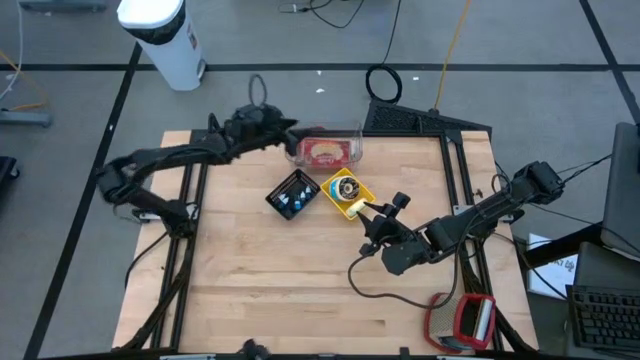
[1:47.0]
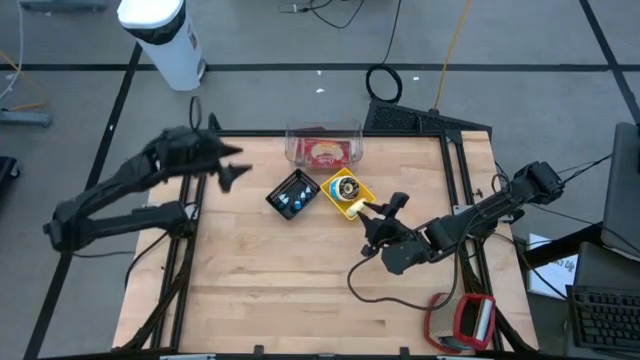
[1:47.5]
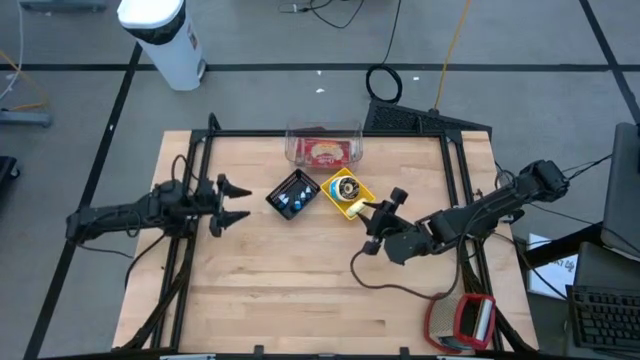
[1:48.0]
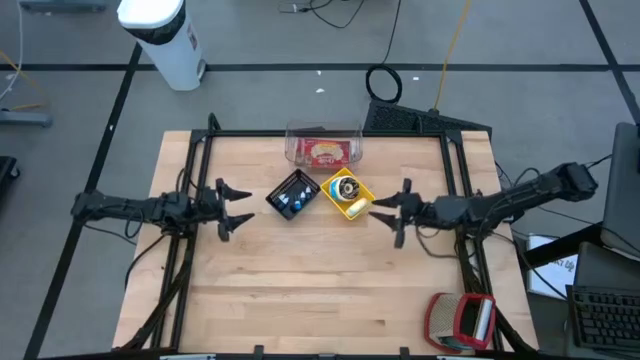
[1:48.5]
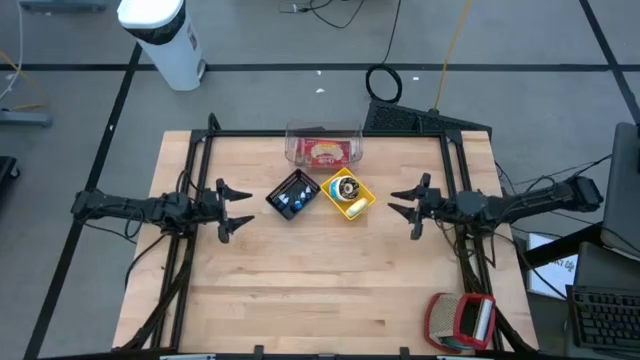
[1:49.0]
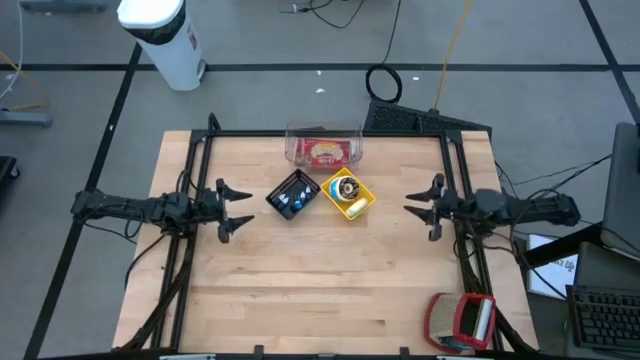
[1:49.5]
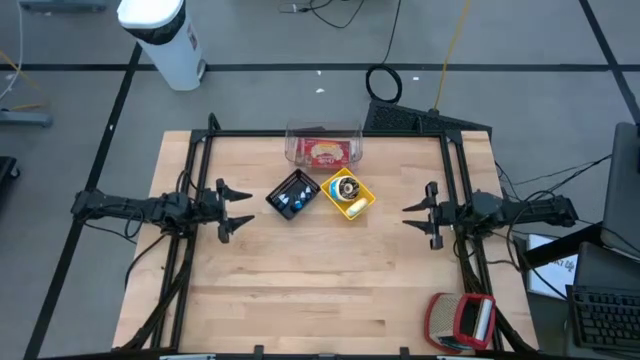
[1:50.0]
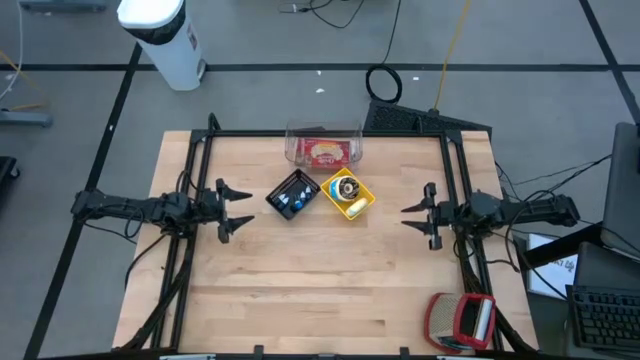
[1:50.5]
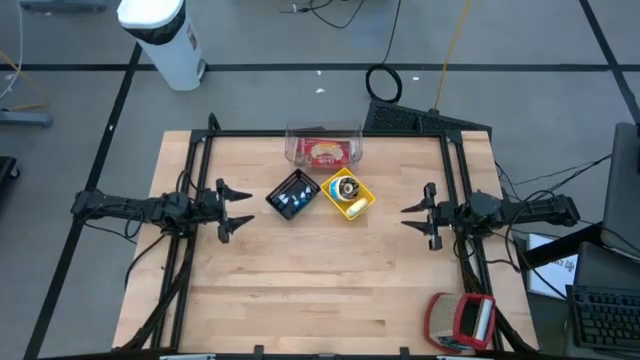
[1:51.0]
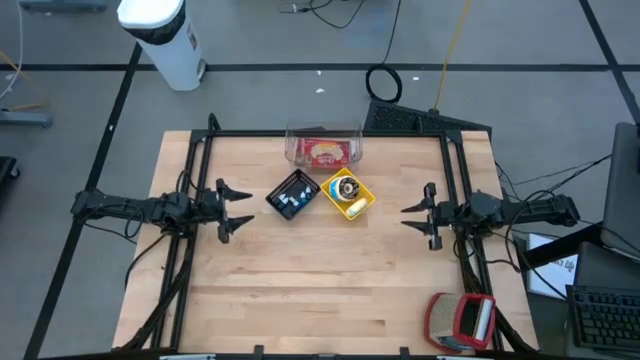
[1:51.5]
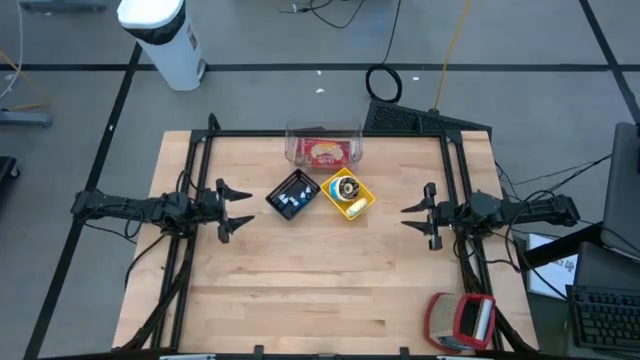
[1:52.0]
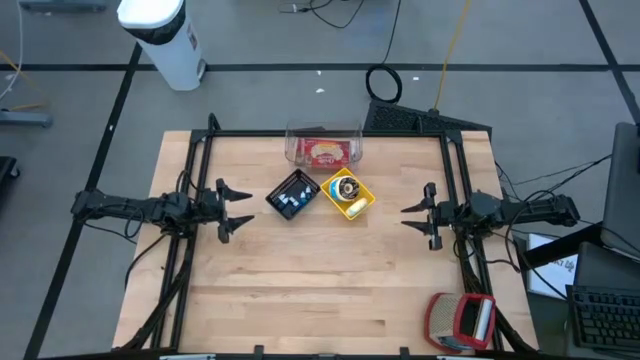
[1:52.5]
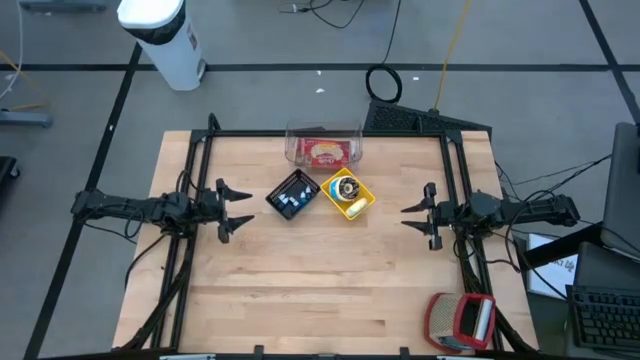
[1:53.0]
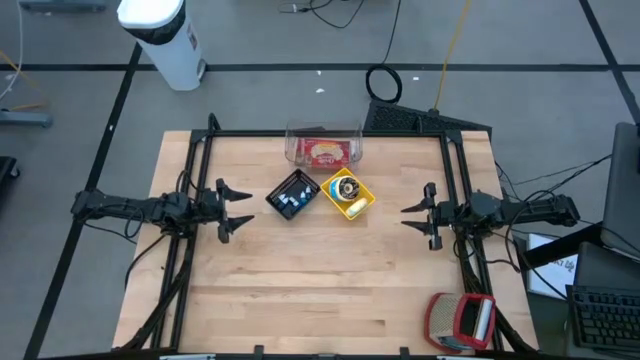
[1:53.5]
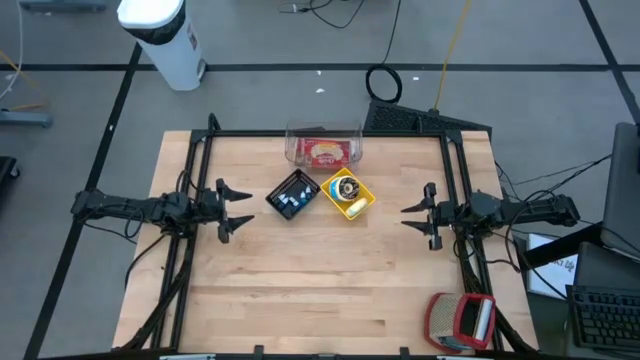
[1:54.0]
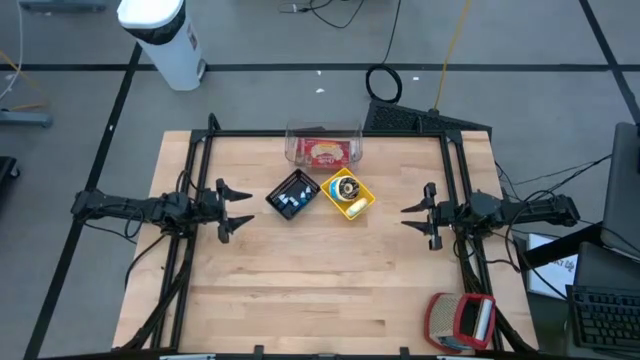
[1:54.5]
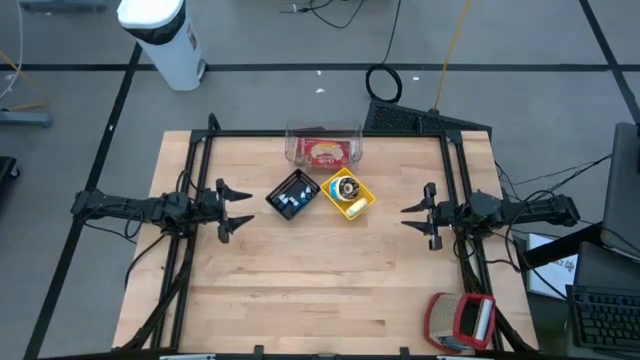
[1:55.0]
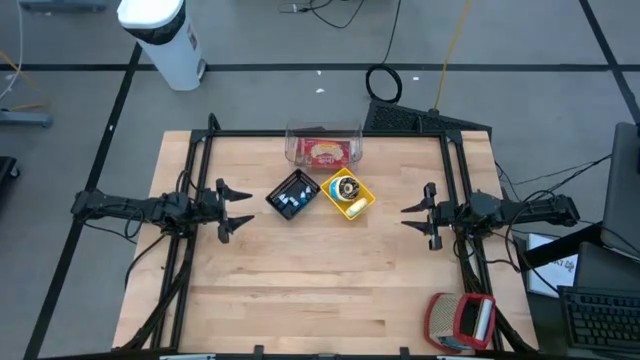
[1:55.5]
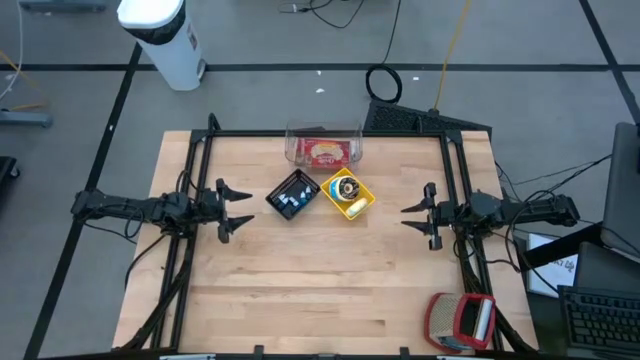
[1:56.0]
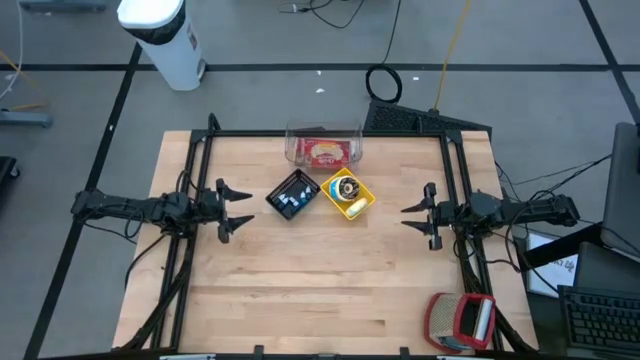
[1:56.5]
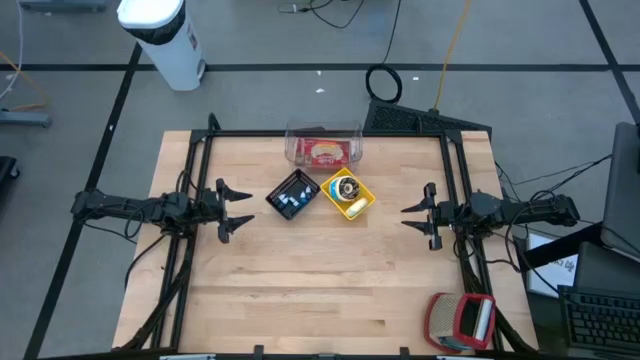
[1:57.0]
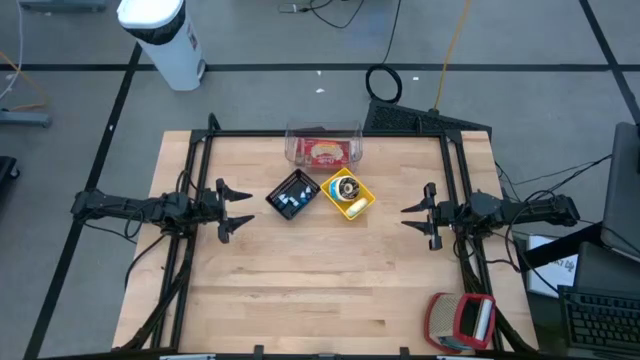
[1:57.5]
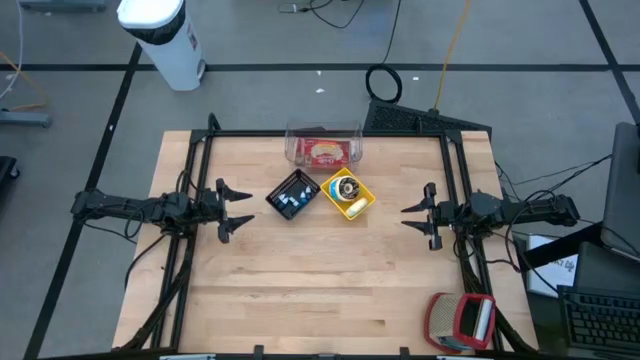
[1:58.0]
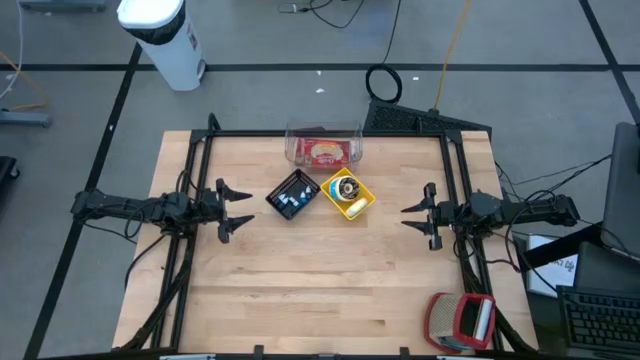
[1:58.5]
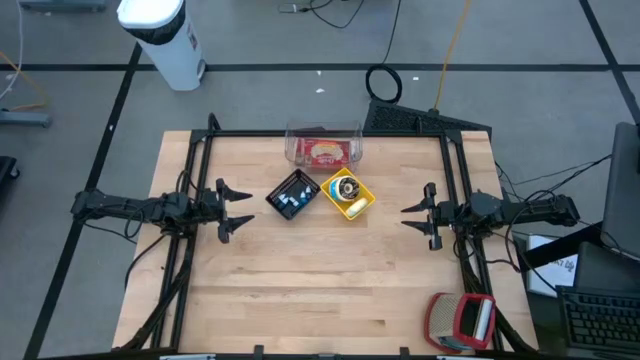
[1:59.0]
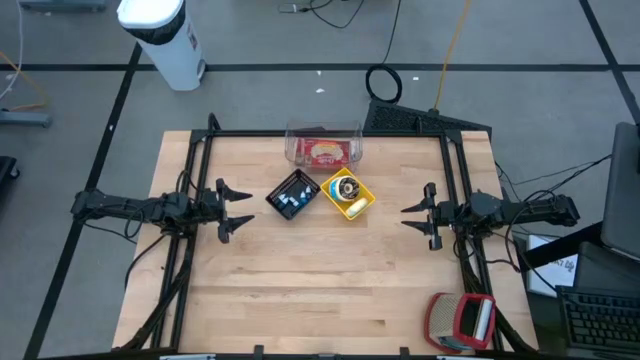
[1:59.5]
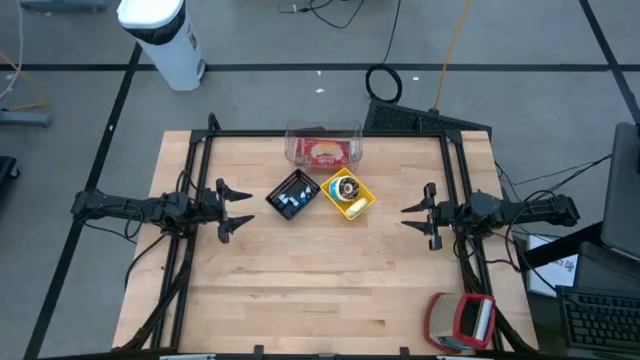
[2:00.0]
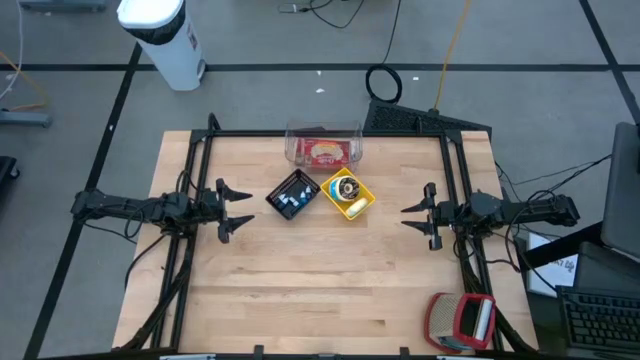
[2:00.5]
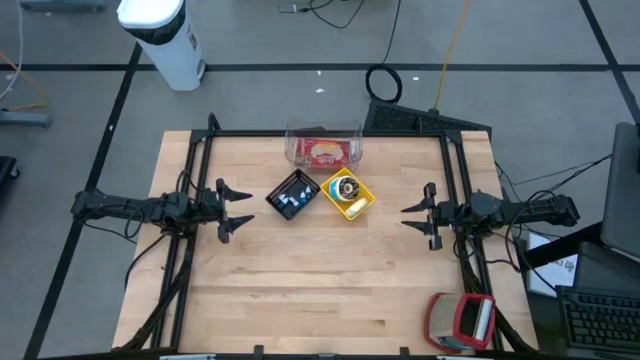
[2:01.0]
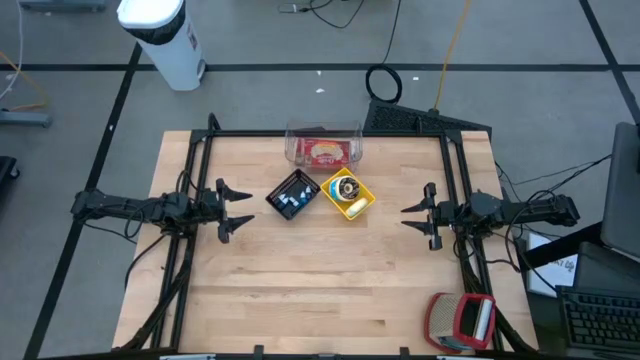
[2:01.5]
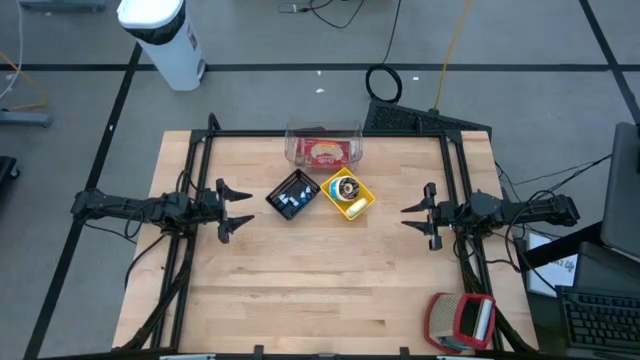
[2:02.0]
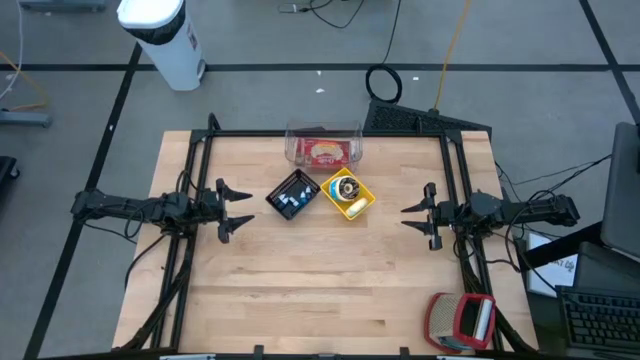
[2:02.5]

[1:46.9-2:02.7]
Return to Home Position

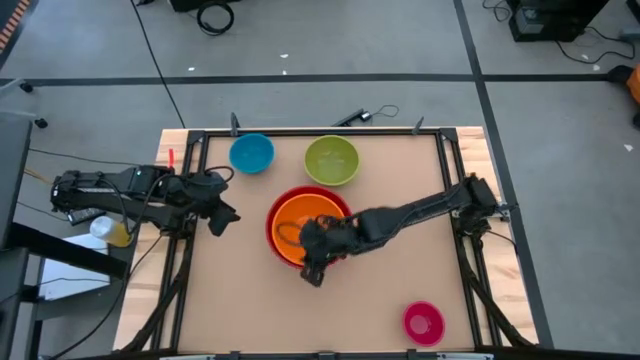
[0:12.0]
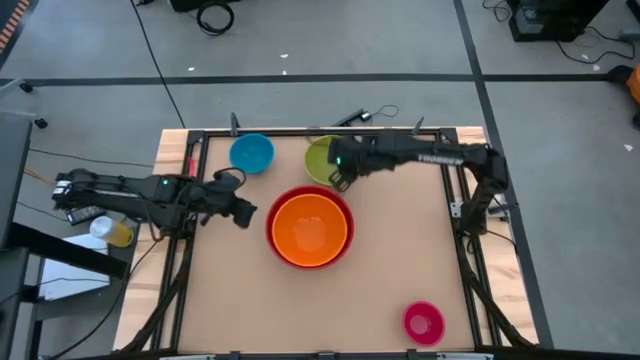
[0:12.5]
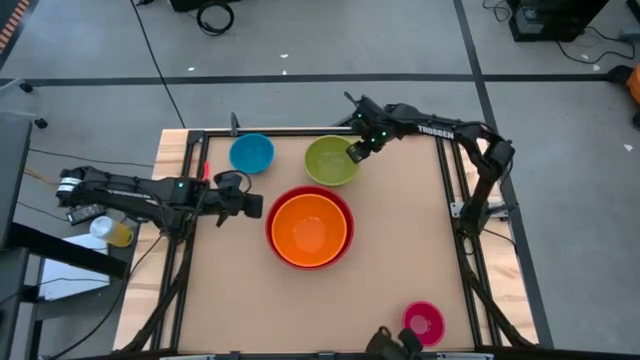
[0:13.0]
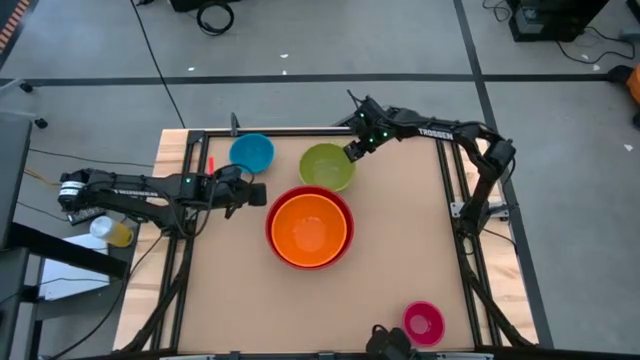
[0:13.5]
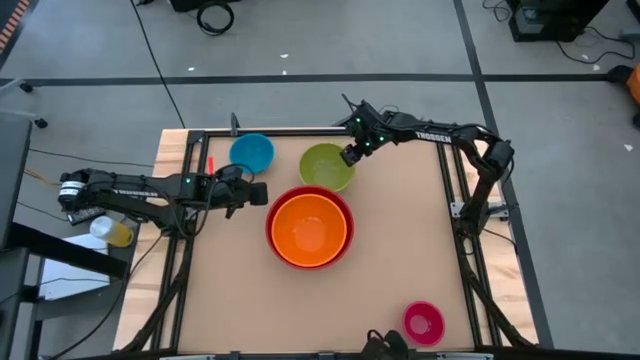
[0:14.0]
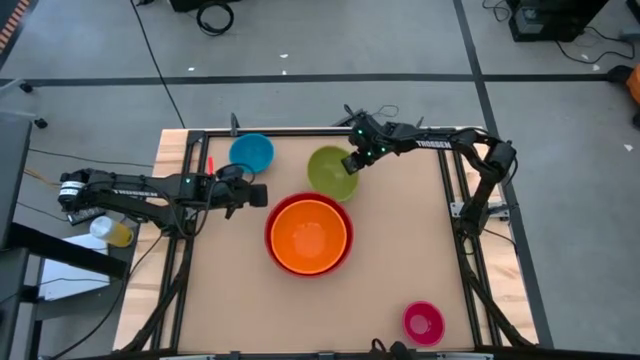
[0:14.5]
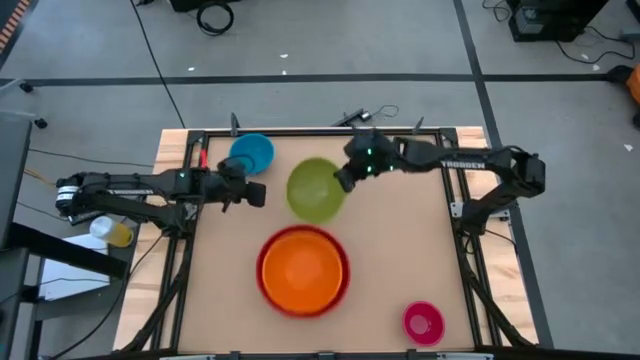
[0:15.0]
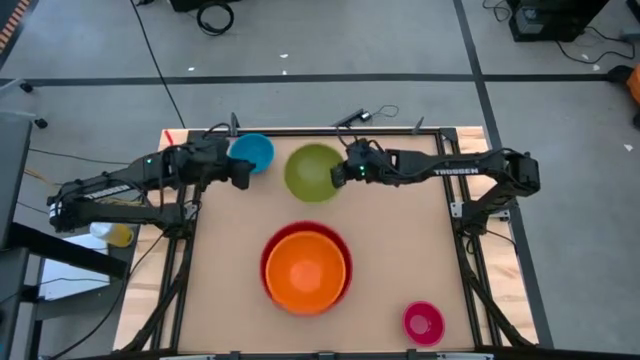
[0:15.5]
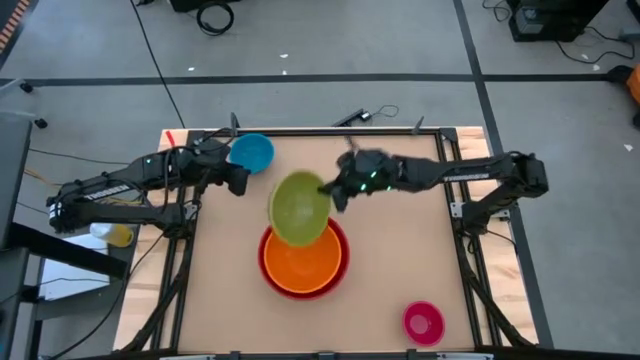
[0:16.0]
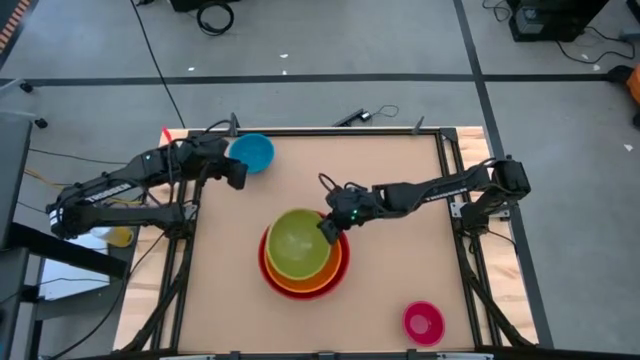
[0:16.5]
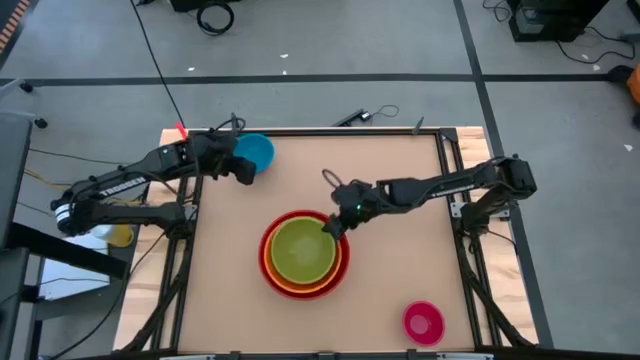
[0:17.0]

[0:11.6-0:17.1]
Stack the green bowl into the orange bowl
